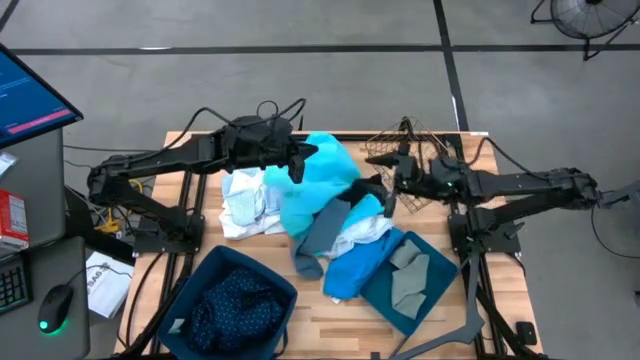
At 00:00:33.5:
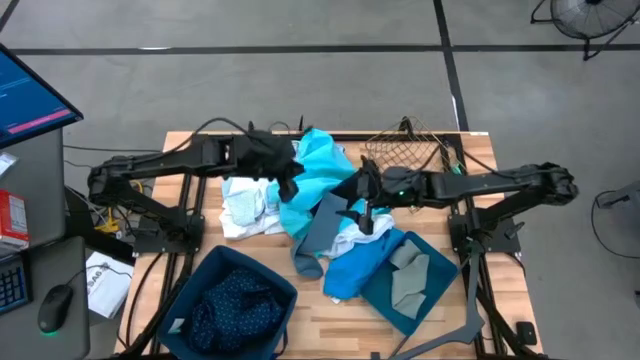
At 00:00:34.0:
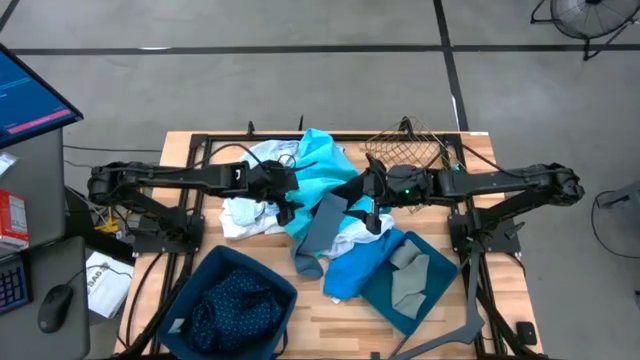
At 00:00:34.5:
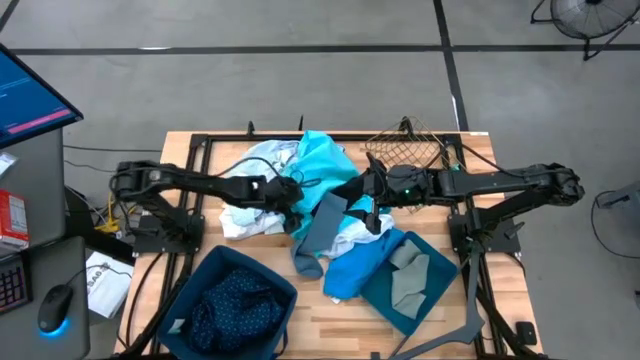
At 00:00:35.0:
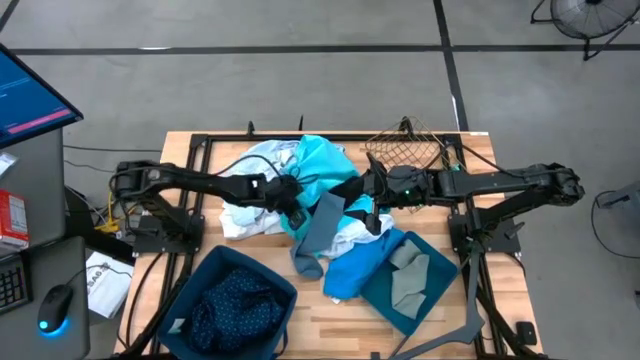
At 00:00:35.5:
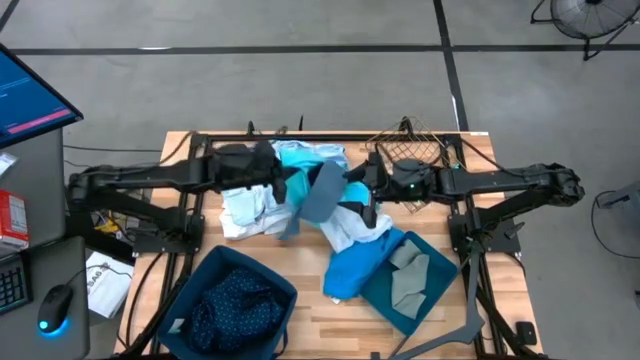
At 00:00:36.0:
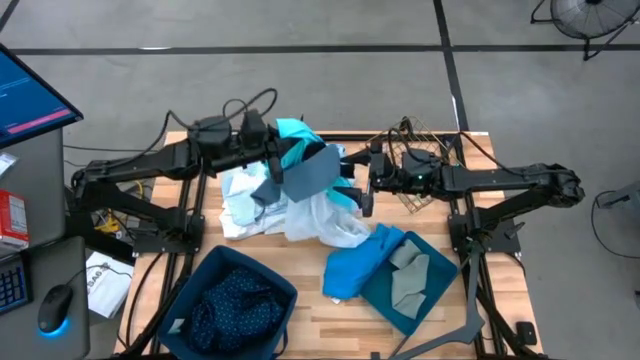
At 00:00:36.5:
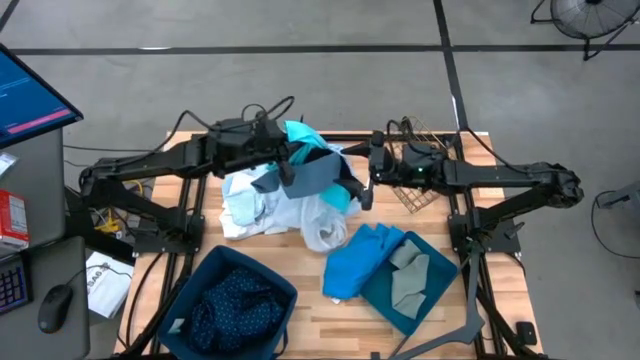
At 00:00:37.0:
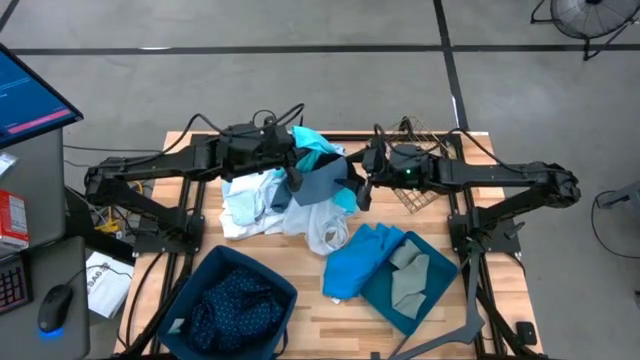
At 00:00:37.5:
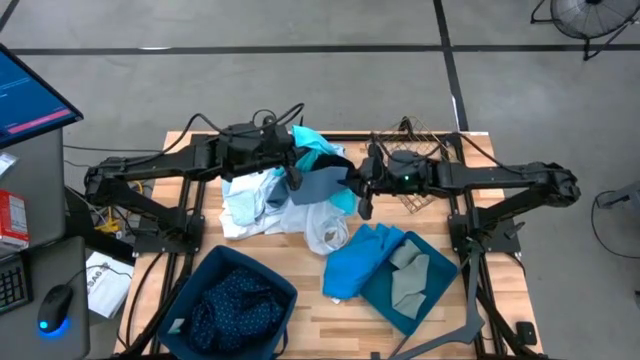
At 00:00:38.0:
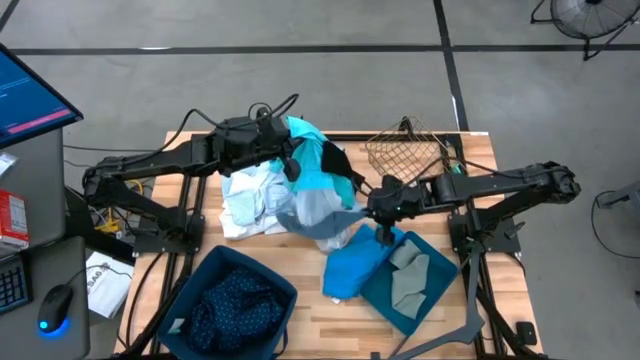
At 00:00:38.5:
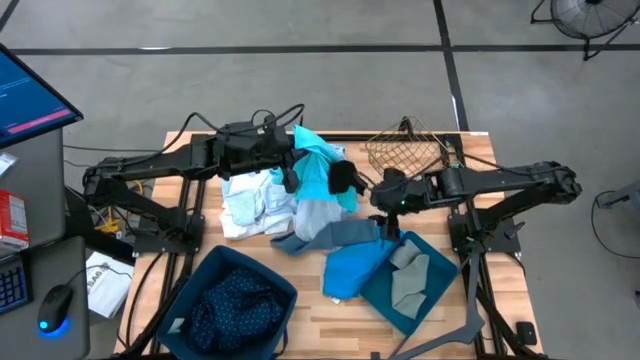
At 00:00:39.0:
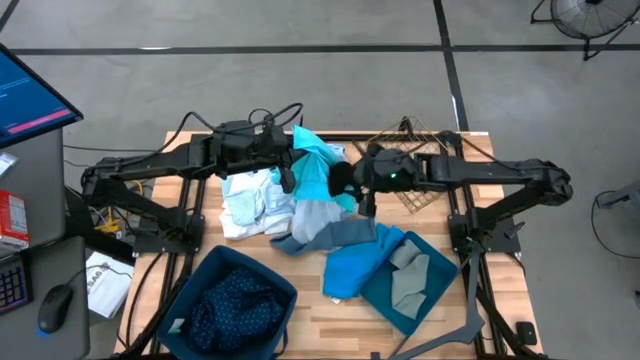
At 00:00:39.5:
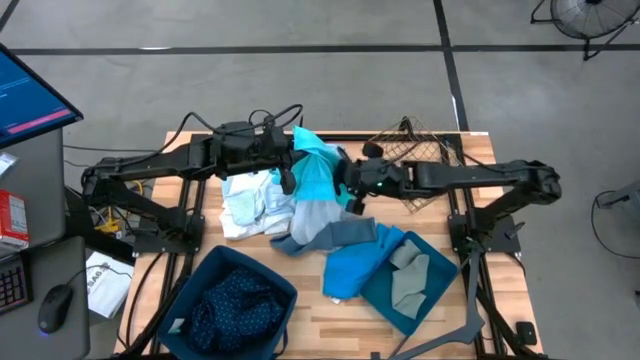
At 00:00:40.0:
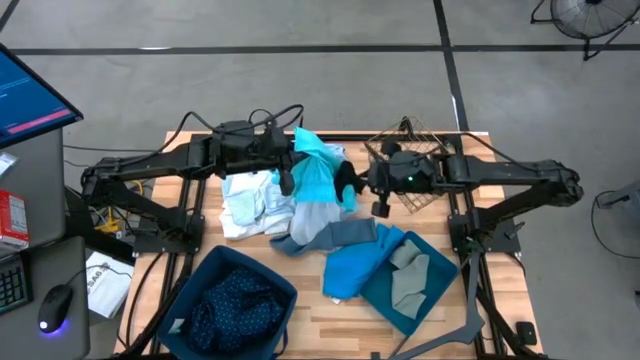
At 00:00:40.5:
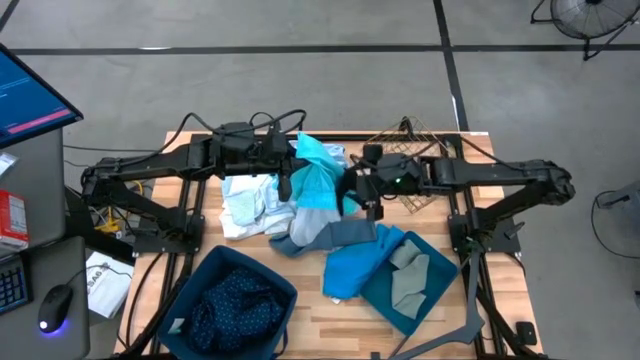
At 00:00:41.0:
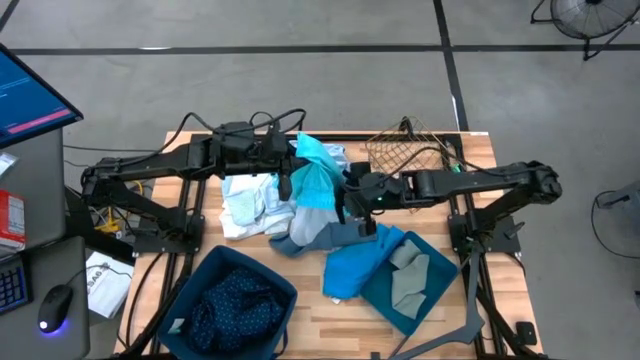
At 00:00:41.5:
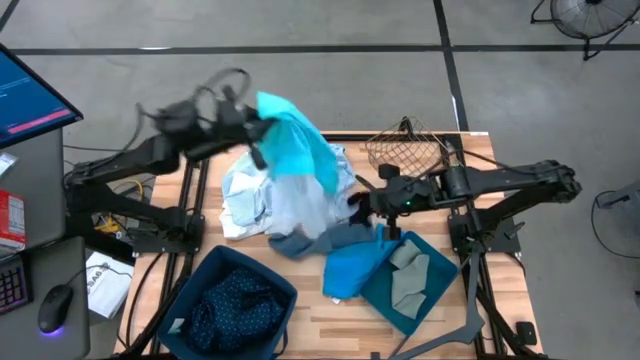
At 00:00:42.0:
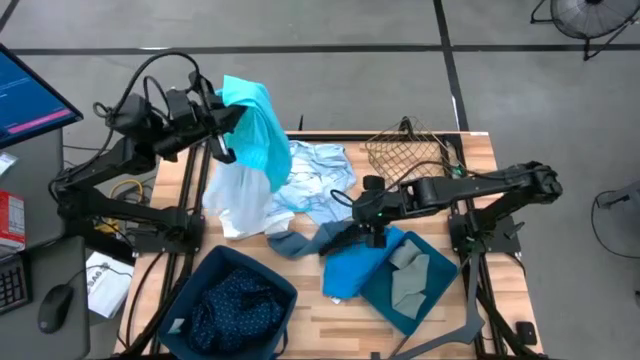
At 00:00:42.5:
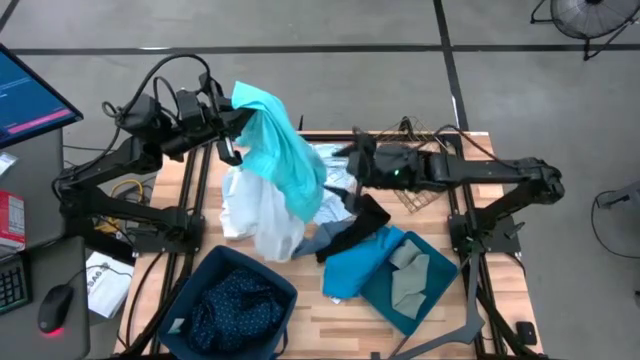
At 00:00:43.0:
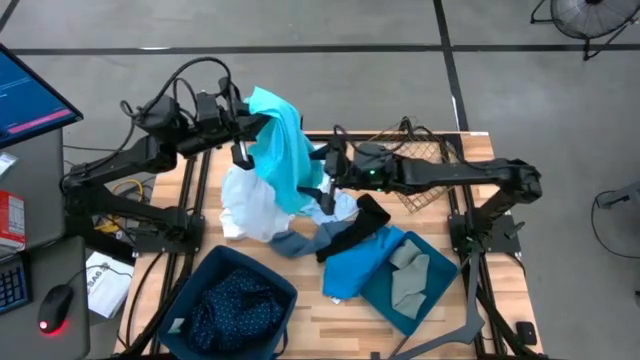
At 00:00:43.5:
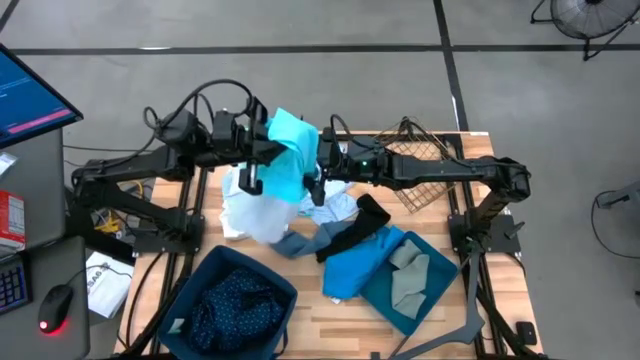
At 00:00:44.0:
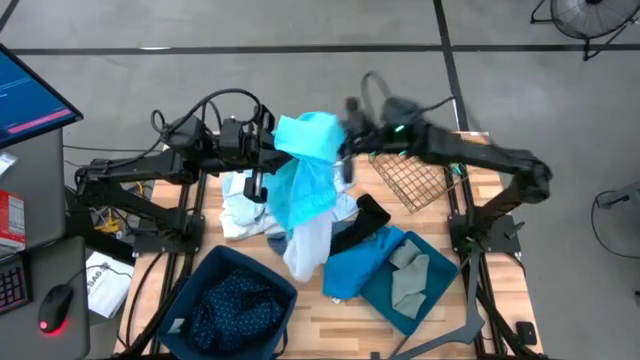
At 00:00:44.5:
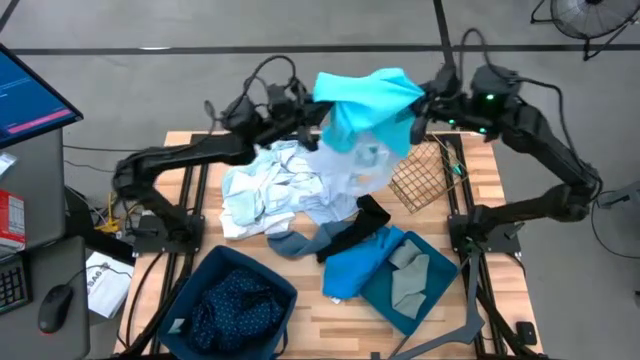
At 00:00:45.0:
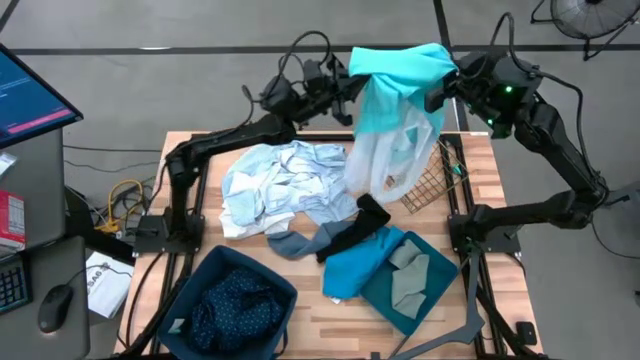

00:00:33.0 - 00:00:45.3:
Task: Pick & Place Cloths
Put the light shorts into the wire basket

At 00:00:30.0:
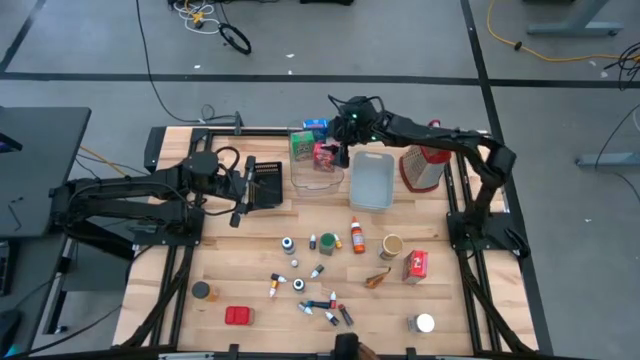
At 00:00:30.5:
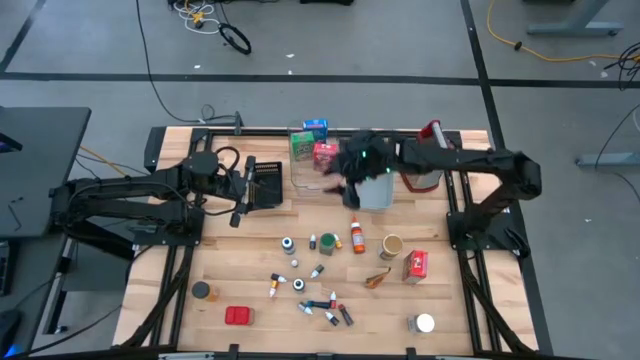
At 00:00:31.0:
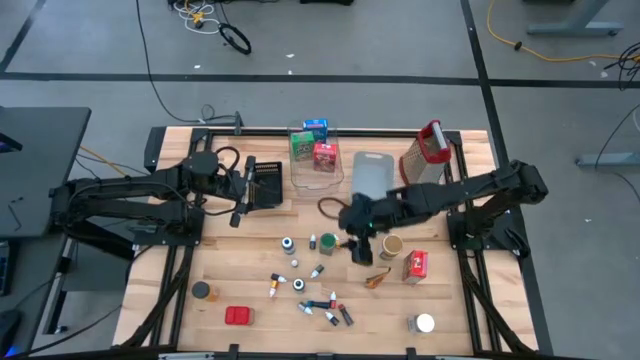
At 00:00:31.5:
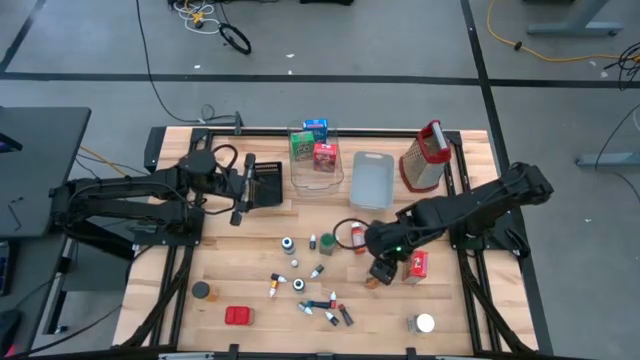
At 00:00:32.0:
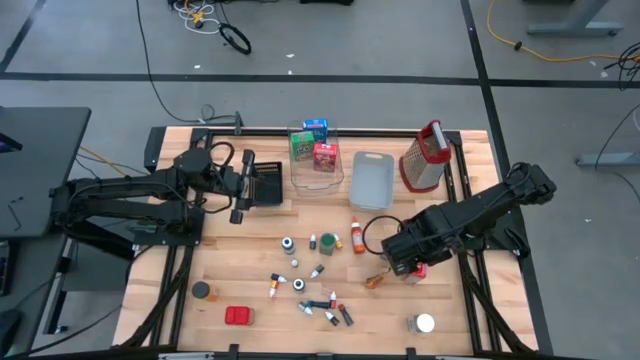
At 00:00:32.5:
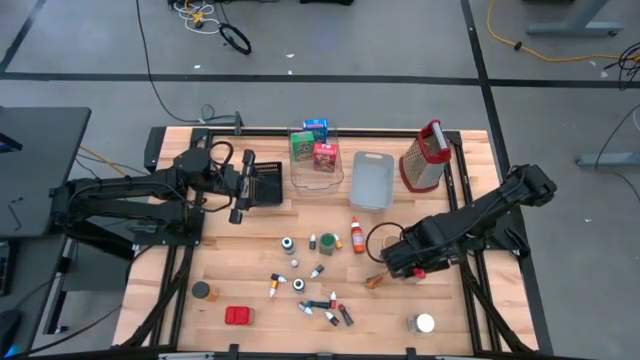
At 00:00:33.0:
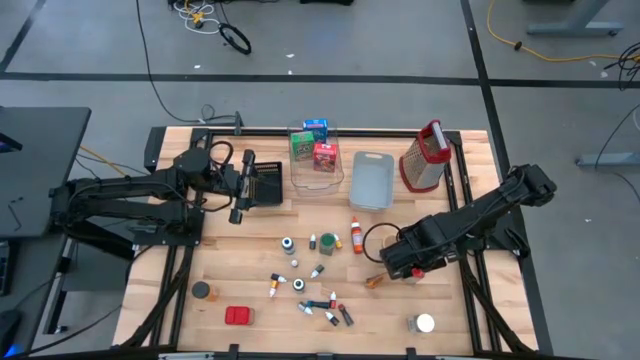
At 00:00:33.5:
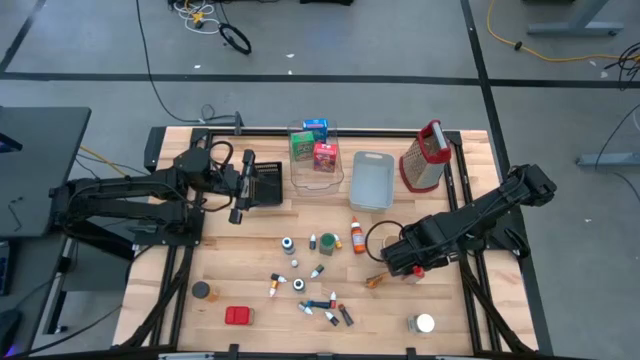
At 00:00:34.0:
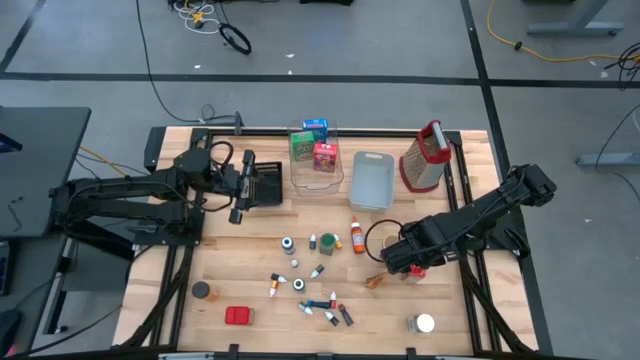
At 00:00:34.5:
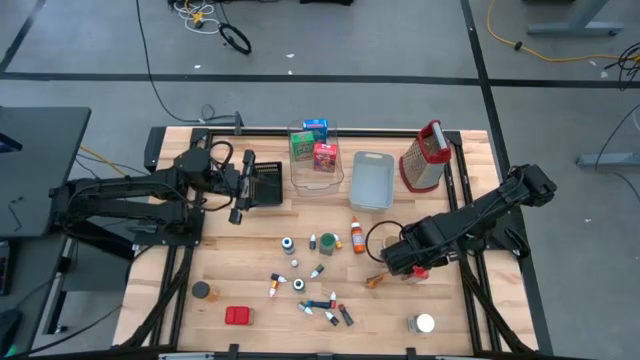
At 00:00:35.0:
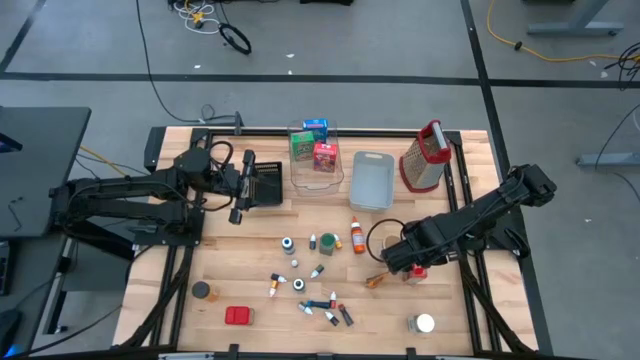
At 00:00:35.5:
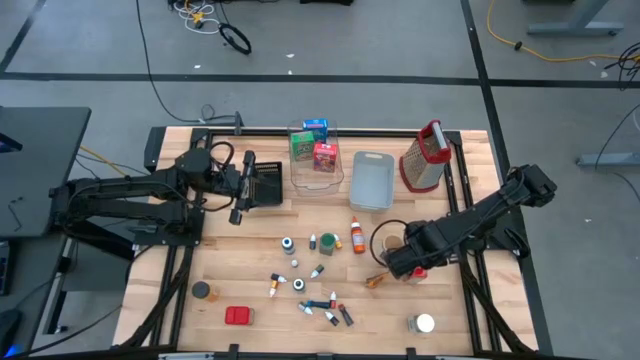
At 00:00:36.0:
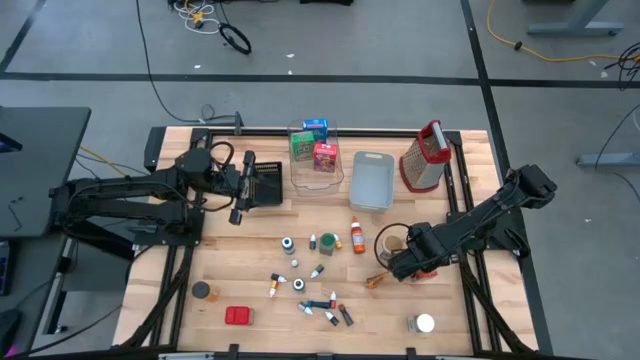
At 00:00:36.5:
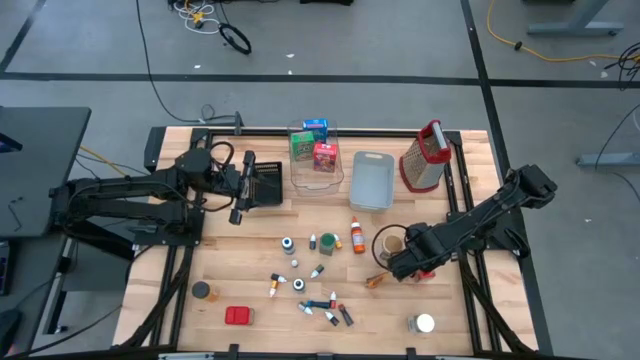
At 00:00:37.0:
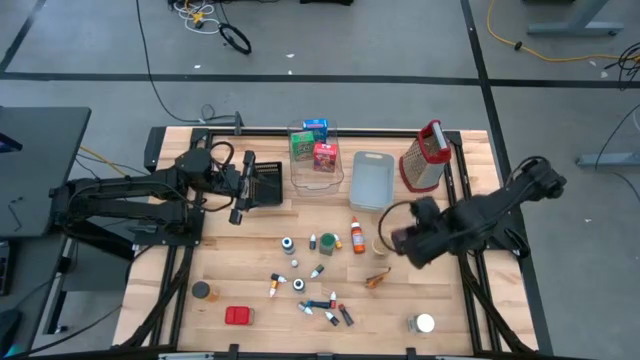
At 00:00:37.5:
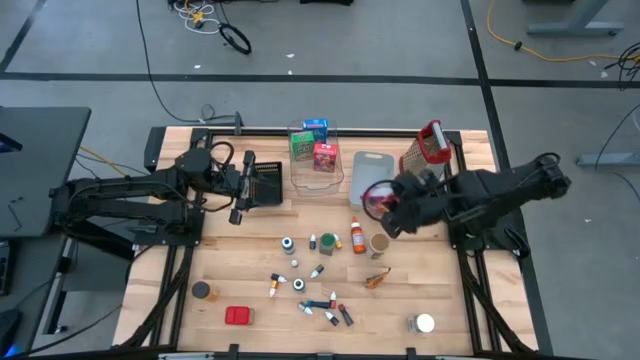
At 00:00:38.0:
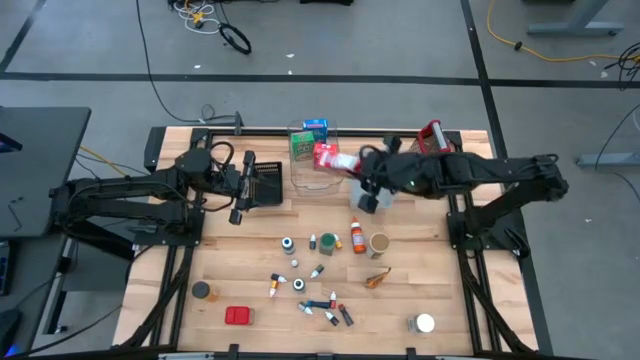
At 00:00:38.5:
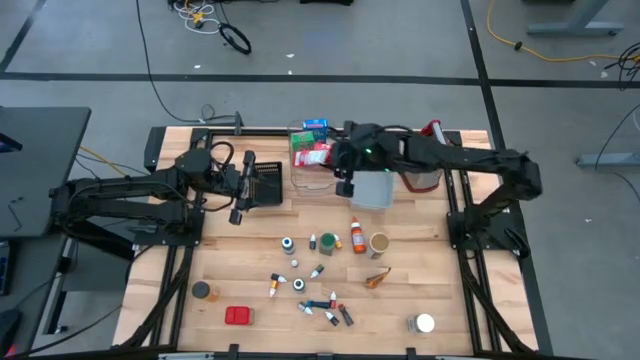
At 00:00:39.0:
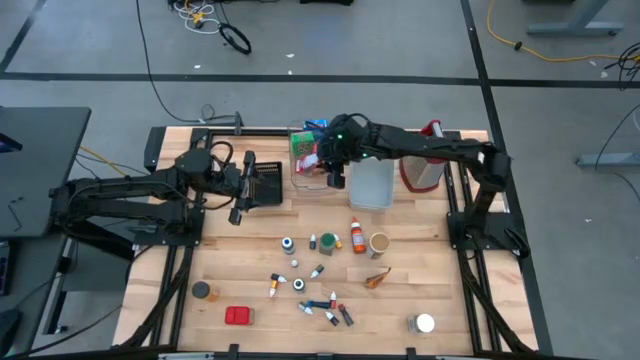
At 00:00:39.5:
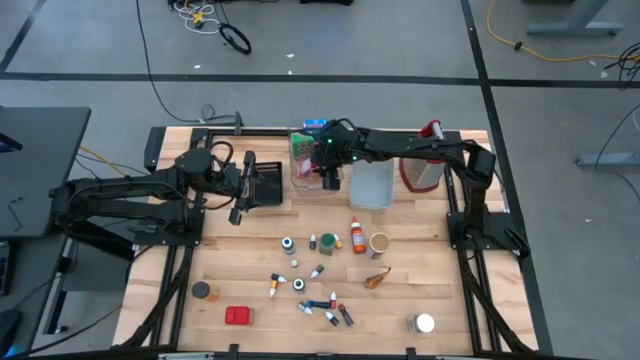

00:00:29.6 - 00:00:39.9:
Task: Pick & Place Kitchen Items
Put the red cereal box into the transparent bin
